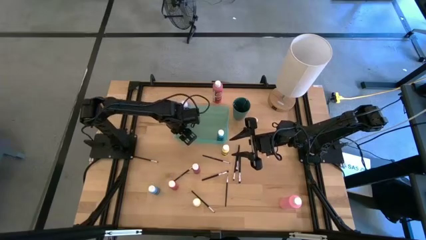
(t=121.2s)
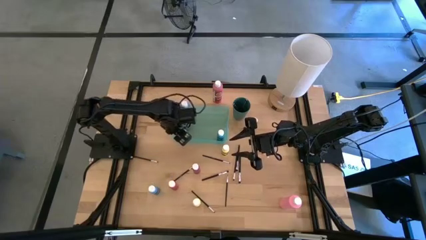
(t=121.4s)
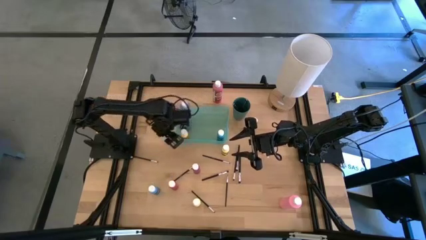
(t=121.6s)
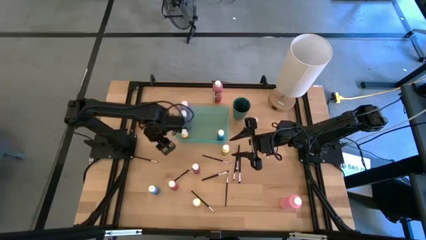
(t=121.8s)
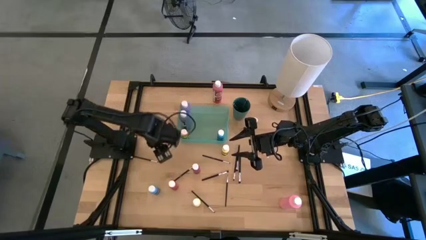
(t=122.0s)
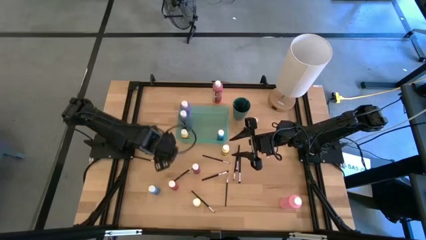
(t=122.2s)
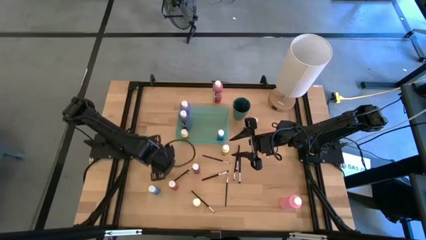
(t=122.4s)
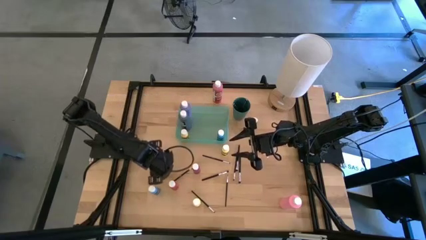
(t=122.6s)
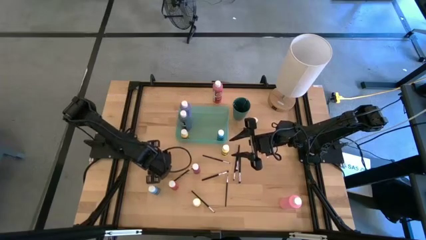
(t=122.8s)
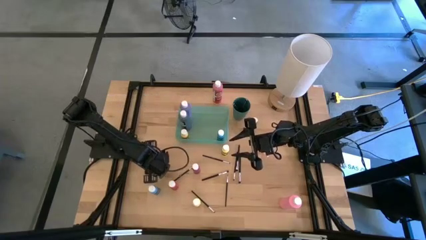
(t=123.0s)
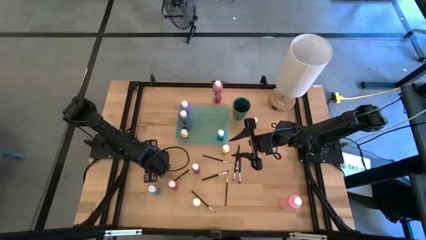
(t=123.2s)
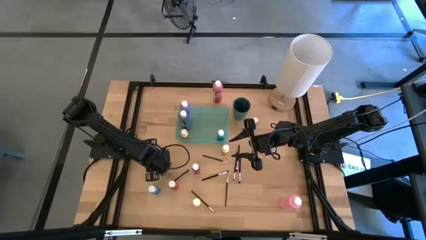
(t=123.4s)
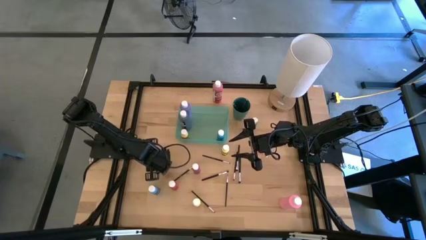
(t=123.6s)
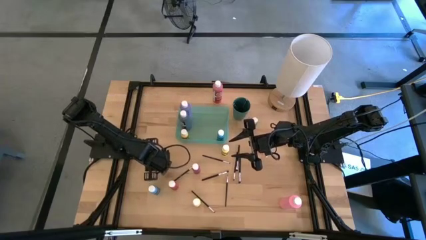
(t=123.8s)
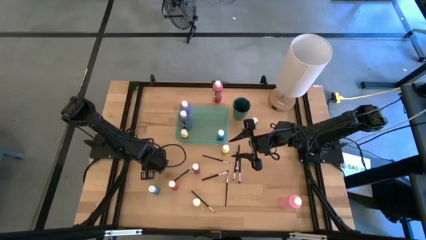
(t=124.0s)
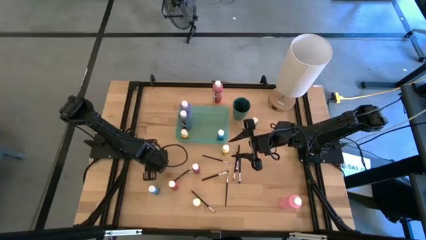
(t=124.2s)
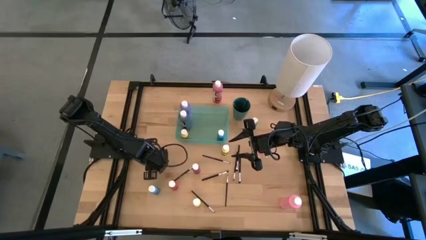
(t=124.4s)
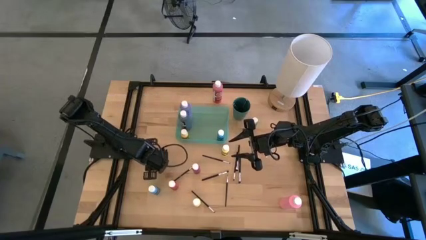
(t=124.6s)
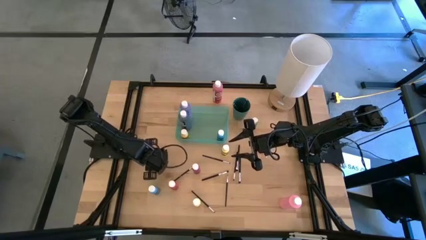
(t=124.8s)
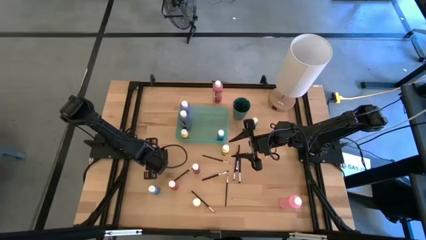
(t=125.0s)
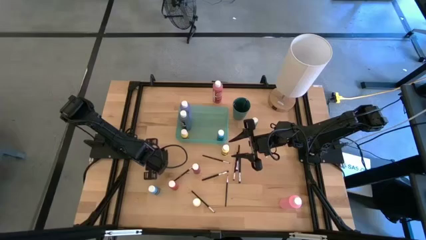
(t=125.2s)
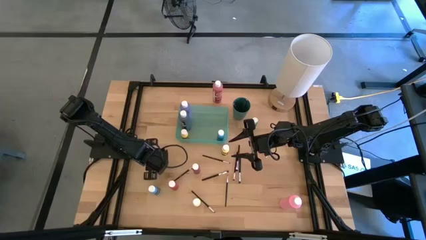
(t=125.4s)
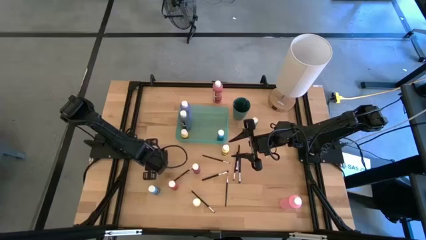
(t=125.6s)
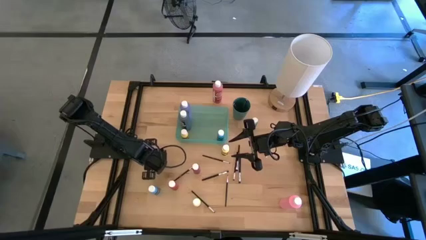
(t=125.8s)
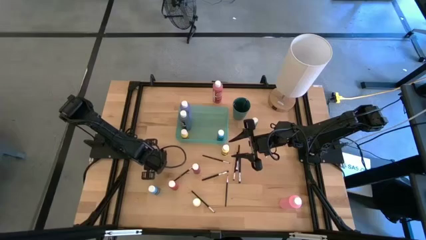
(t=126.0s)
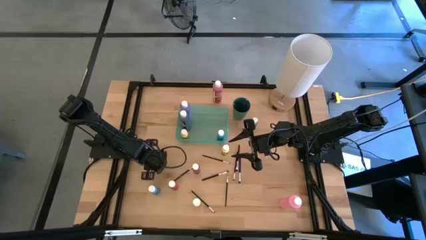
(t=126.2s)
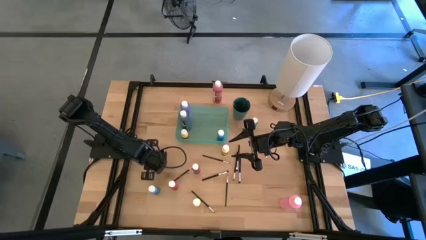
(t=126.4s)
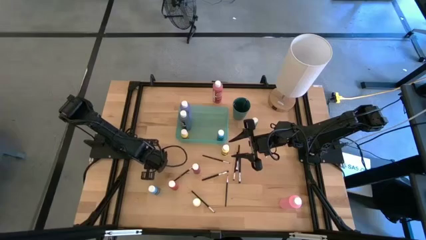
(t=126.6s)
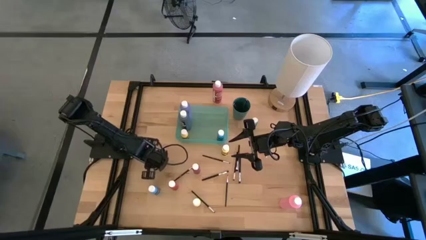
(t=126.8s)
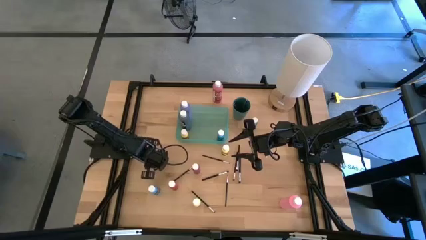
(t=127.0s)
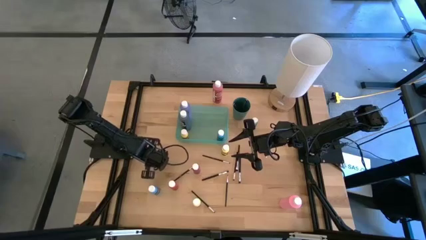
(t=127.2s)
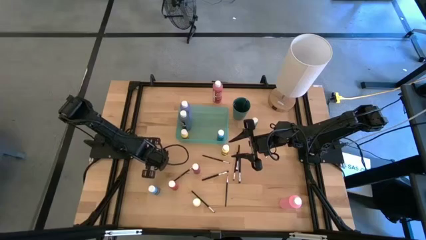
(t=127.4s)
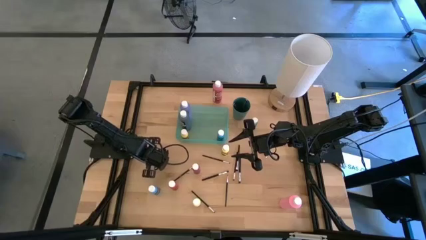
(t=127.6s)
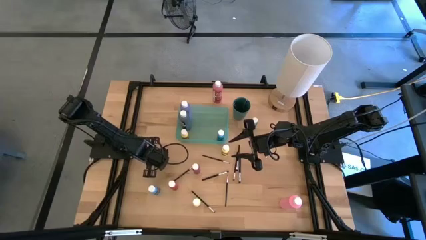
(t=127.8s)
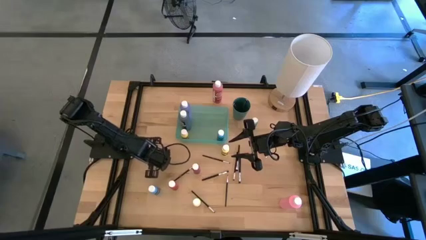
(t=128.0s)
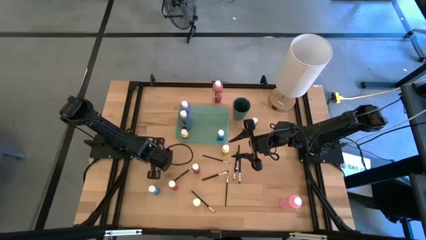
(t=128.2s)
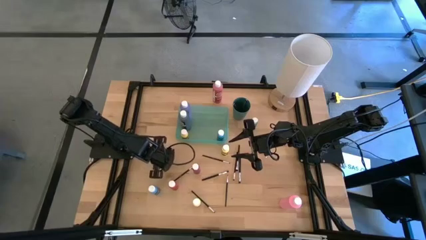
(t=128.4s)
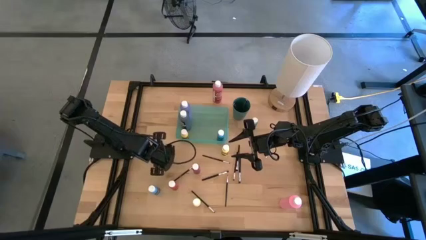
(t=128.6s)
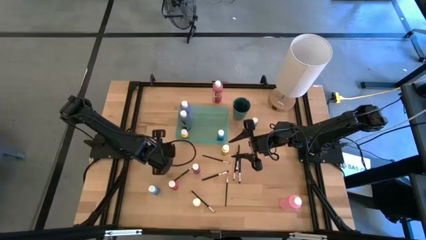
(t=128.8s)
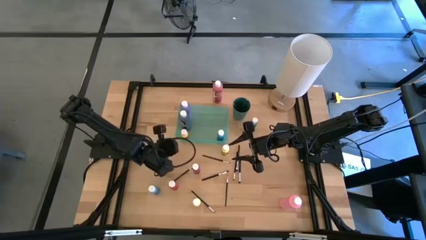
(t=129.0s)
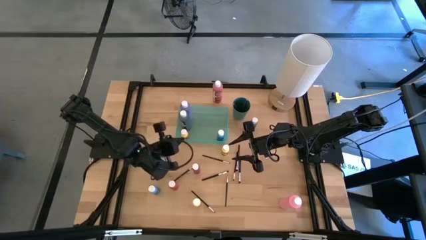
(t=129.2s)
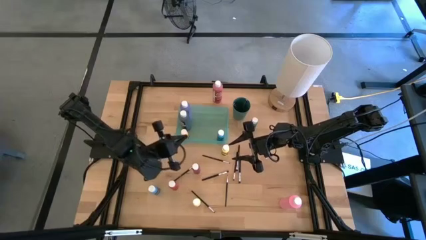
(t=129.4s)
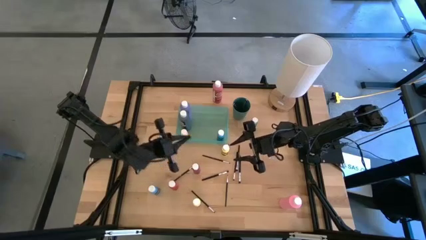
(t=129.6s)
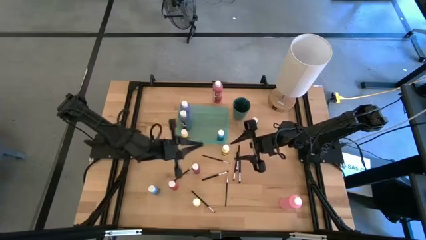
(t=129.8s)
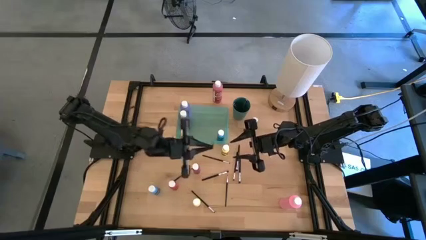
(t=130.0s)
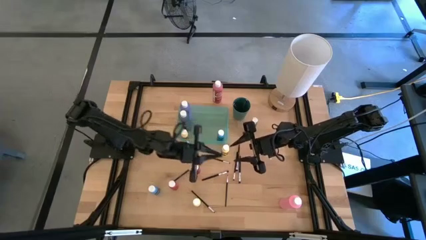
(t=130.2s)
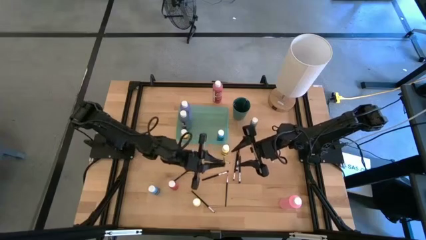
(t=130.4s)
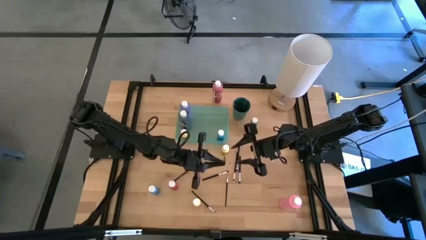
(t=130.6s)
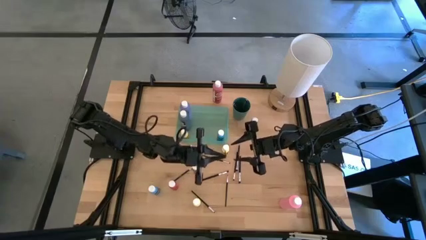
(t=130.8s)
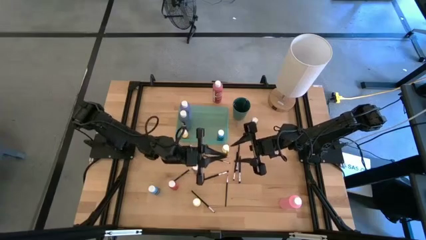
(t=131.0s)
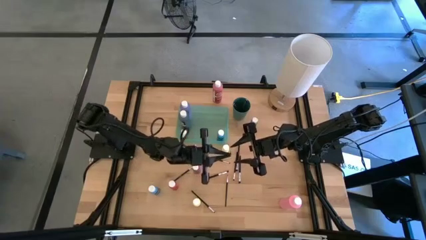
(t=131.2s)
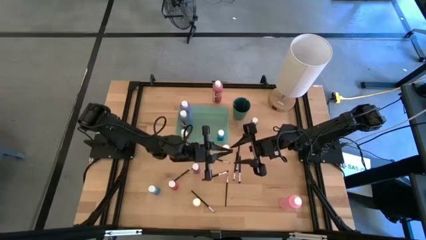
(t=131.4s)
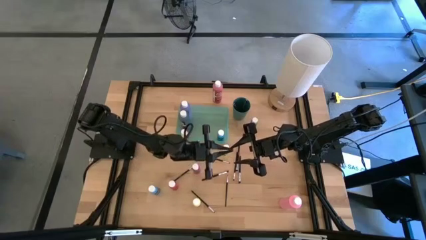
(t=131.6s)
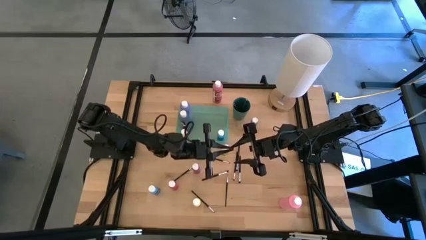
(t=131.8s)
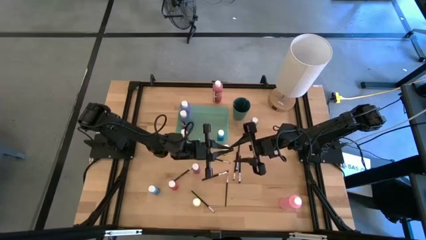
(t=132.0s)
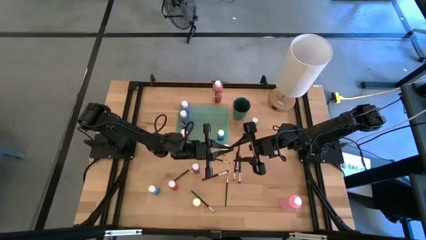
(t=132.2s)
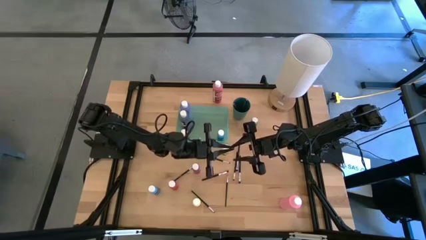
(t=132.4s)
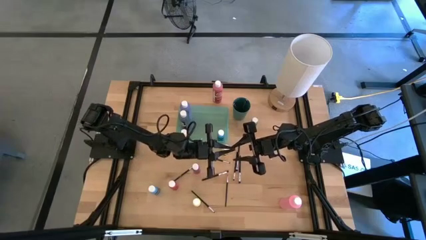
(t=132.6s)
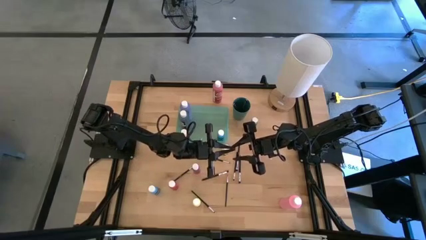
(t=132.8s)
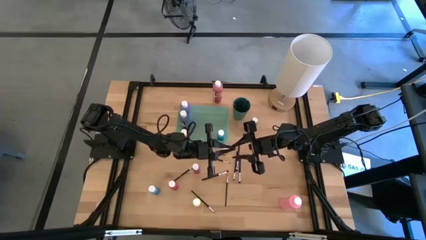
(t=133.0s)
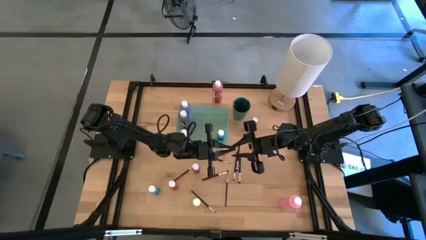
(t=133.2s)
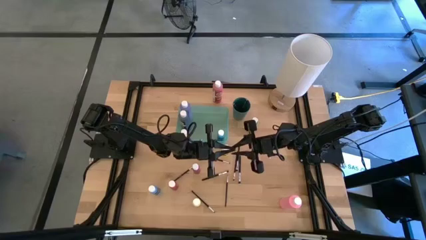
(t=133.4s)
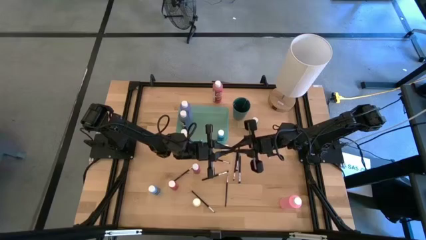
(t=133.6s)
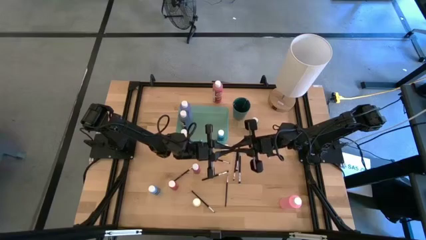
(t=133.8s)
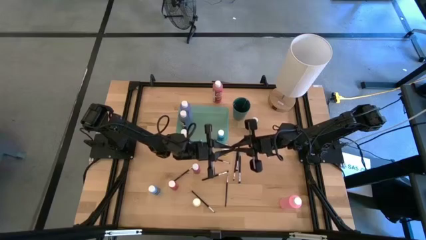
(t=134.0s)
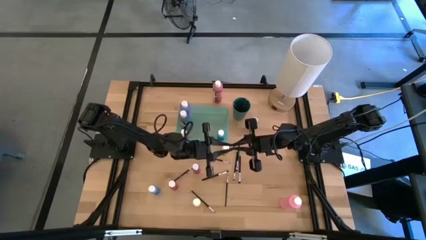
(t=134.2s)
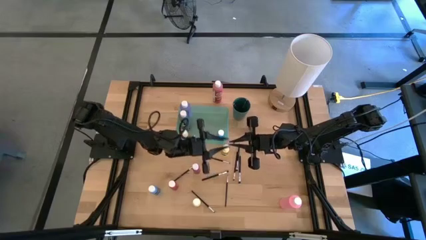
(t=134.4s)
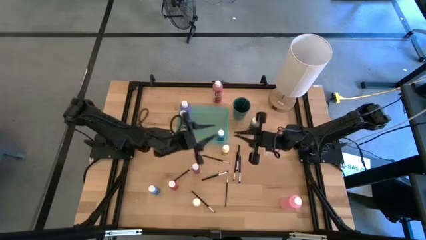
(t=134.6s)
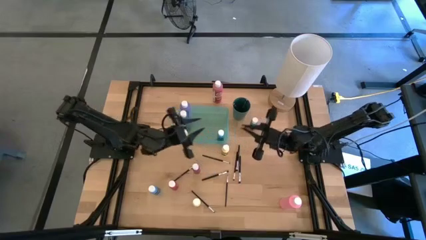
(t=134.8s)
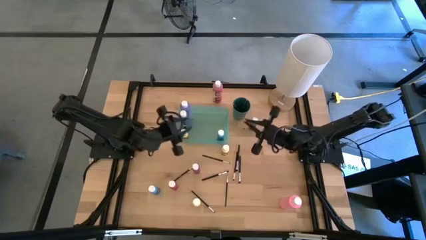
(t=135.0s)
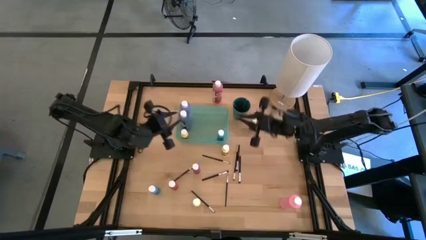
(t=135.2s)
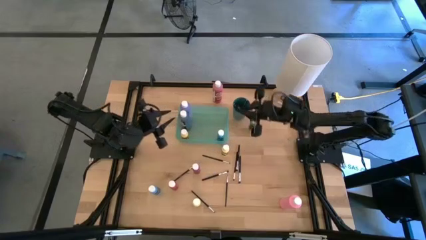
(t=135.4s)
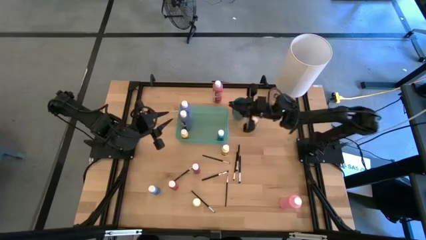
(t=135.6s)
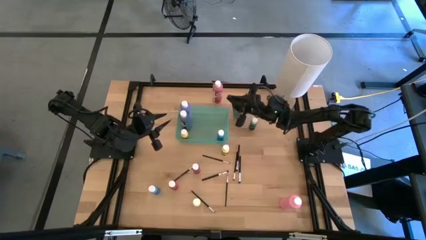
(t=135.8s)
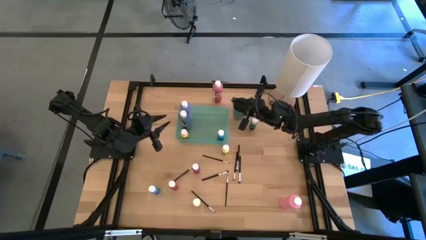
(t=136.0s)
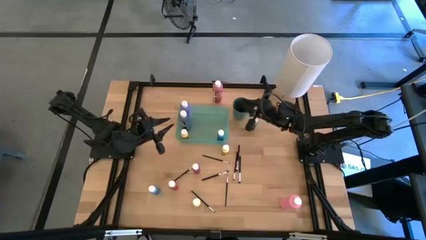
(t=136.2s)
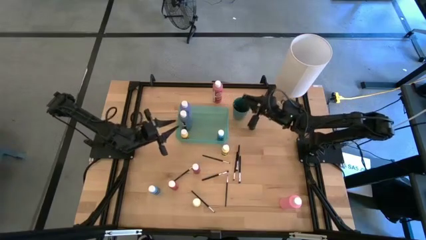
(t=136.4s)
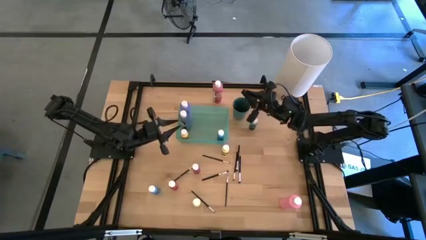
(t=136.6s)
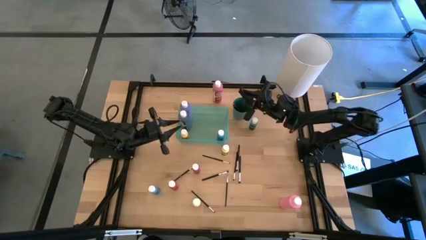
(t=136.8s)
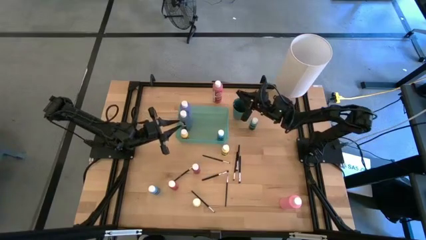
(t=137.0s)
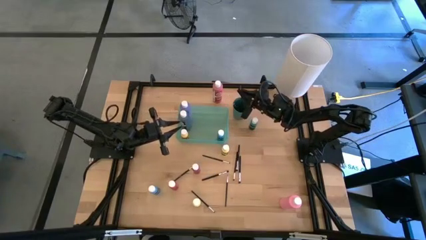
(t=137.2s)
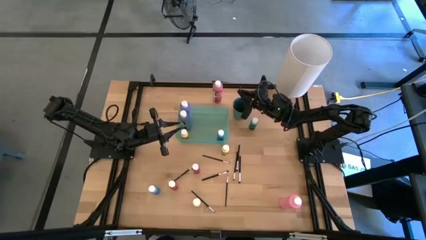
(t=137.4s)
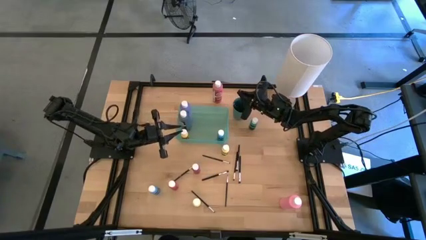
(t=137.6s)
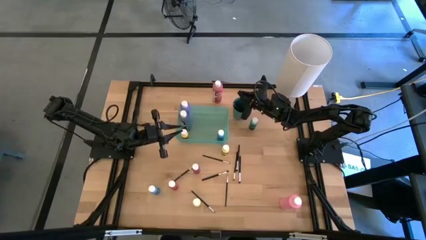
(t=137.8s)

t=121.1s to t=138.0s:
Task: Pick & Place Paint Supplies
Put the black paint brush into the dark green cup
